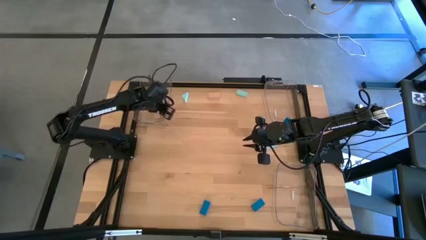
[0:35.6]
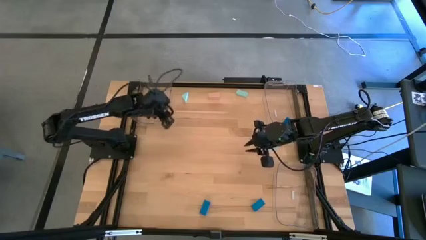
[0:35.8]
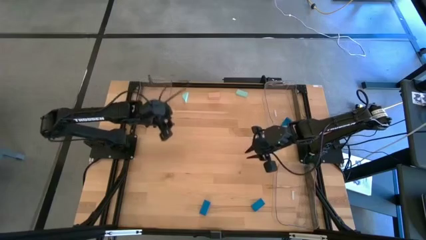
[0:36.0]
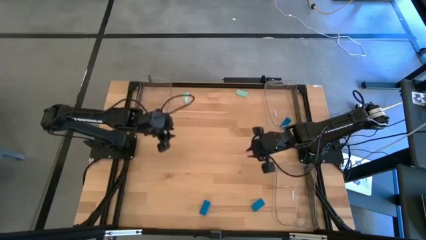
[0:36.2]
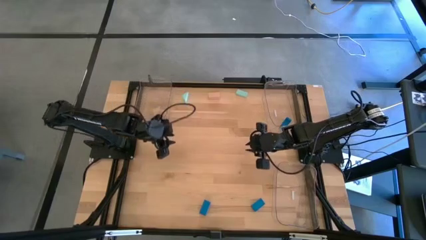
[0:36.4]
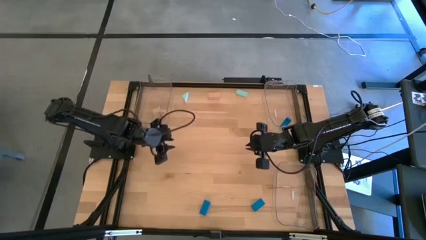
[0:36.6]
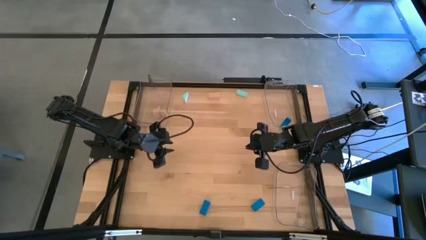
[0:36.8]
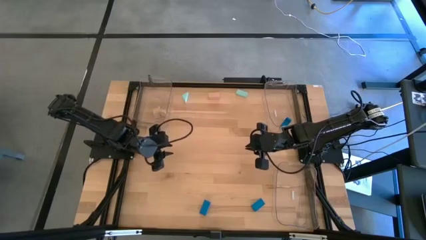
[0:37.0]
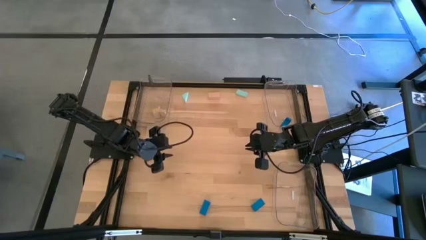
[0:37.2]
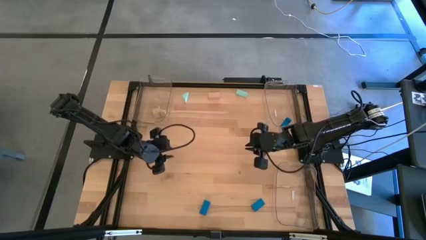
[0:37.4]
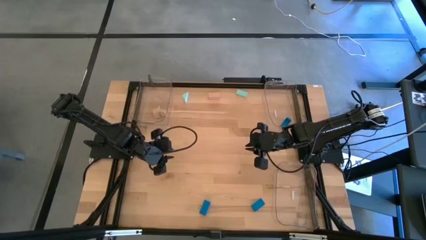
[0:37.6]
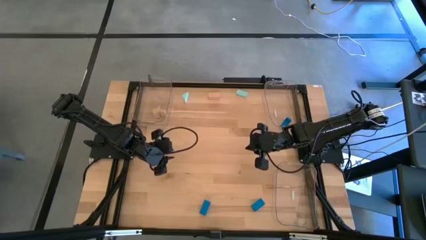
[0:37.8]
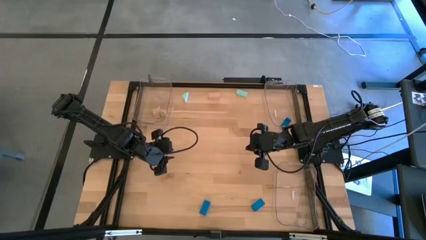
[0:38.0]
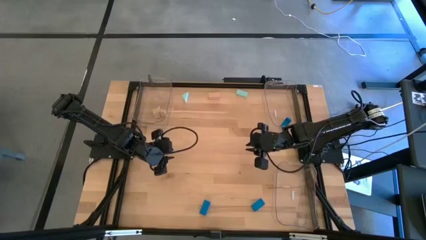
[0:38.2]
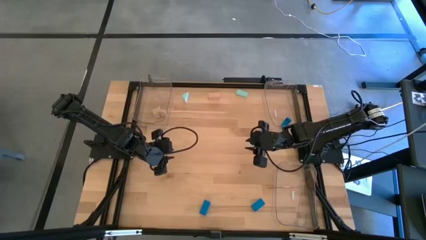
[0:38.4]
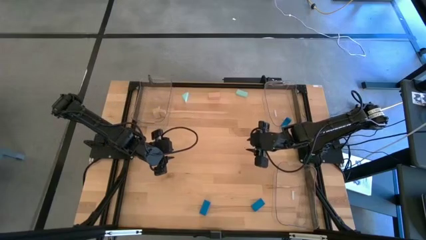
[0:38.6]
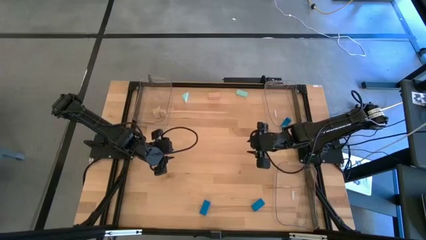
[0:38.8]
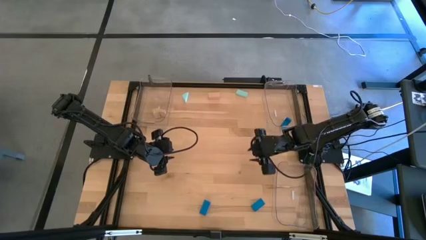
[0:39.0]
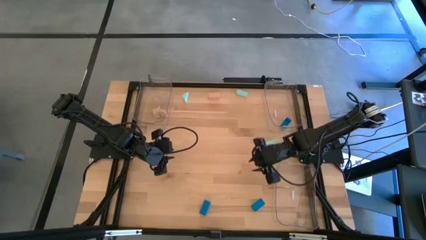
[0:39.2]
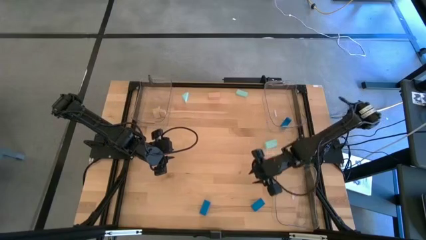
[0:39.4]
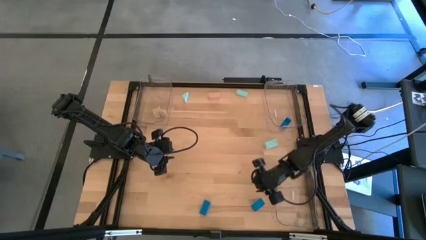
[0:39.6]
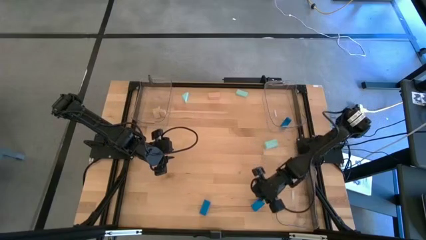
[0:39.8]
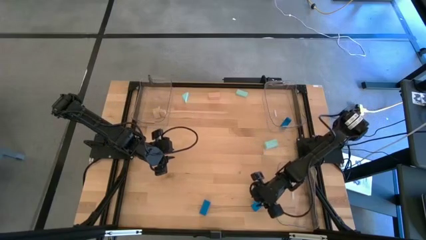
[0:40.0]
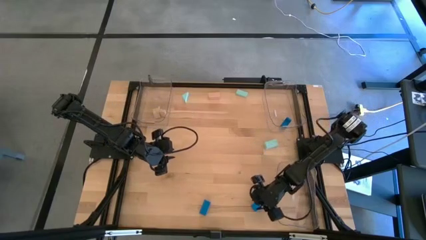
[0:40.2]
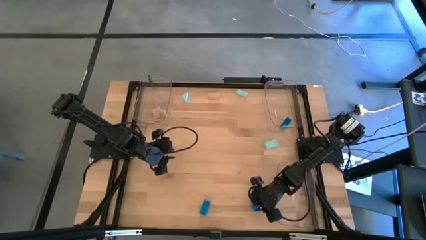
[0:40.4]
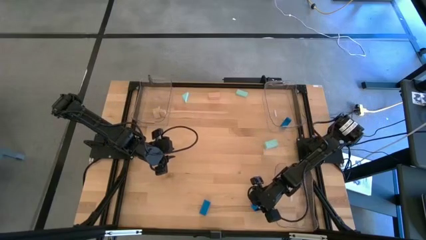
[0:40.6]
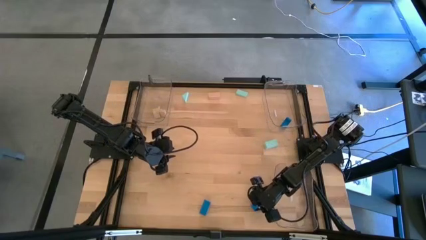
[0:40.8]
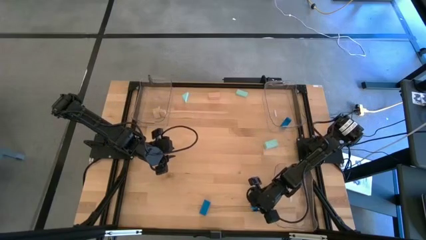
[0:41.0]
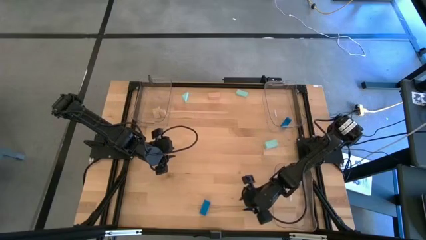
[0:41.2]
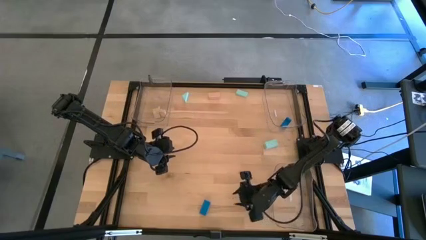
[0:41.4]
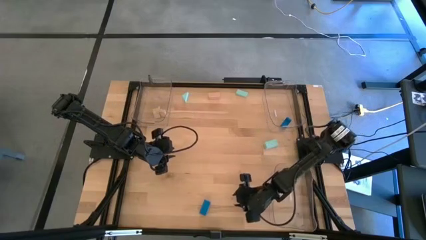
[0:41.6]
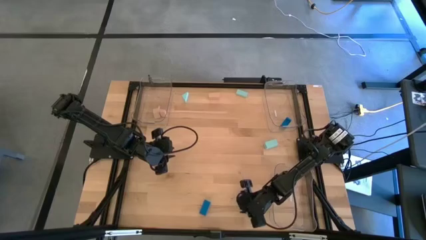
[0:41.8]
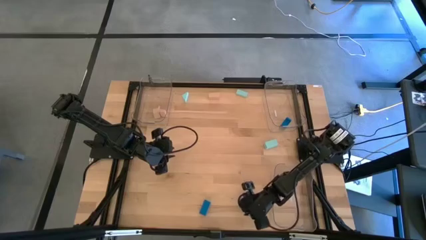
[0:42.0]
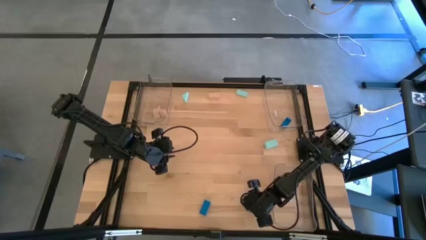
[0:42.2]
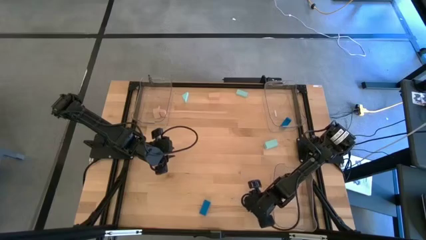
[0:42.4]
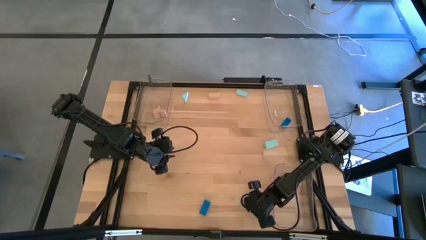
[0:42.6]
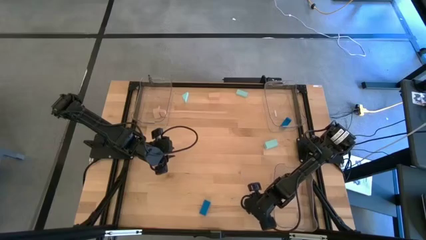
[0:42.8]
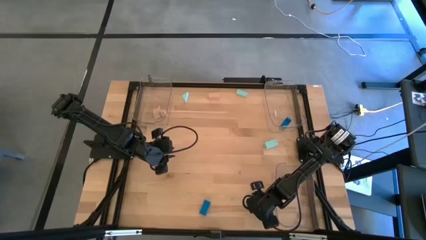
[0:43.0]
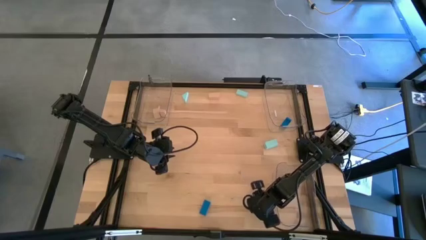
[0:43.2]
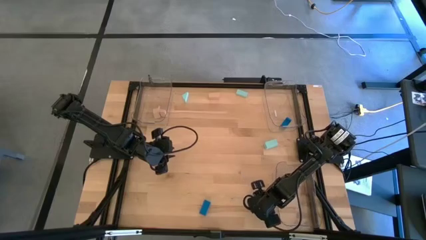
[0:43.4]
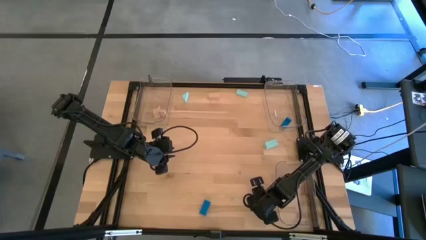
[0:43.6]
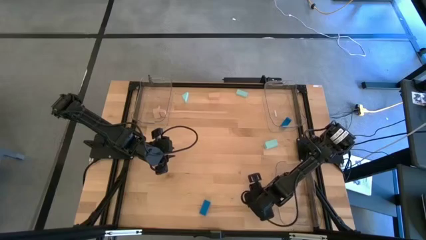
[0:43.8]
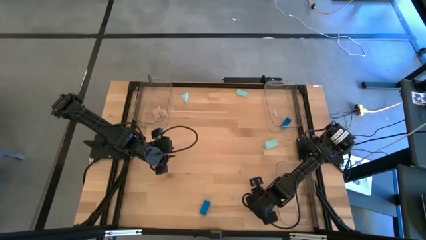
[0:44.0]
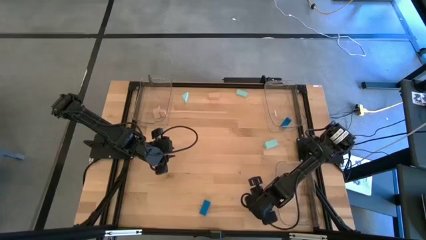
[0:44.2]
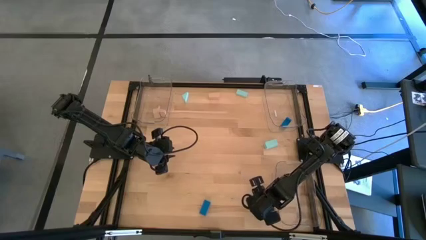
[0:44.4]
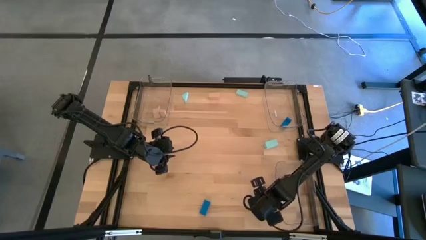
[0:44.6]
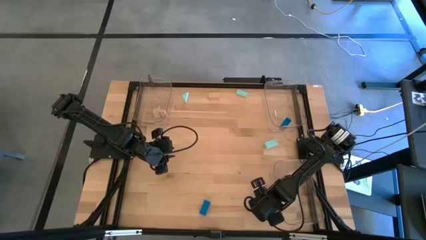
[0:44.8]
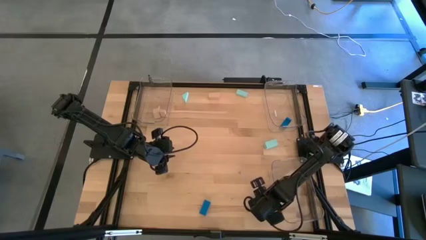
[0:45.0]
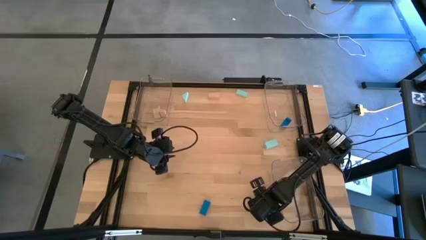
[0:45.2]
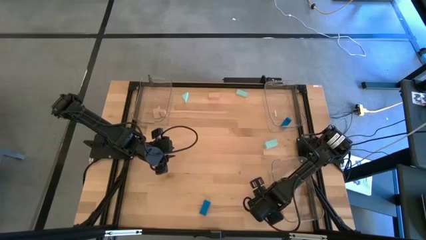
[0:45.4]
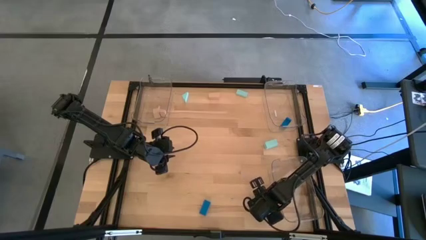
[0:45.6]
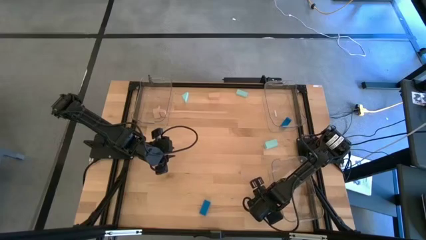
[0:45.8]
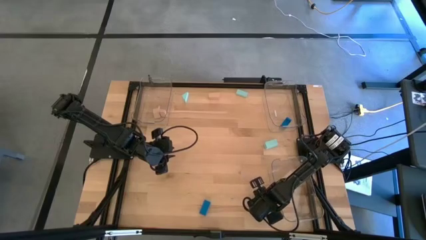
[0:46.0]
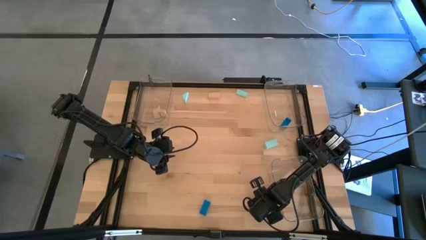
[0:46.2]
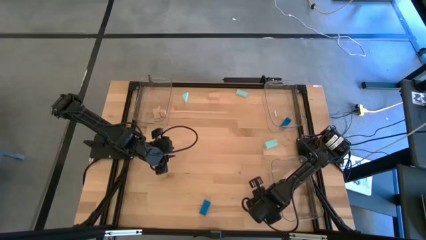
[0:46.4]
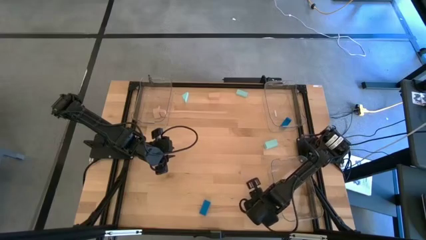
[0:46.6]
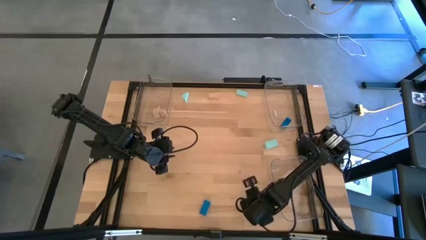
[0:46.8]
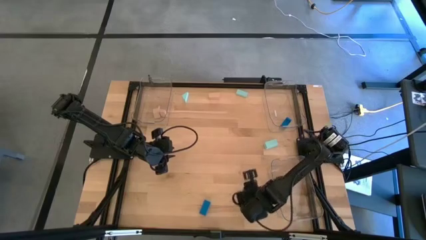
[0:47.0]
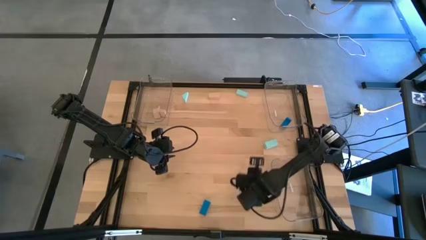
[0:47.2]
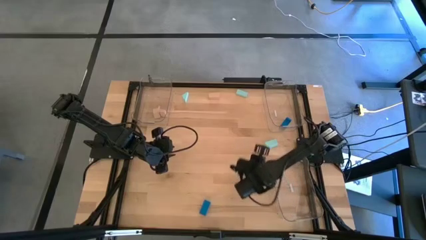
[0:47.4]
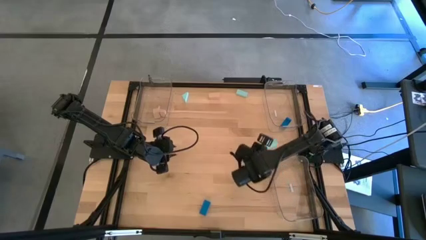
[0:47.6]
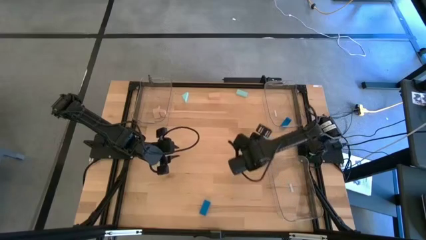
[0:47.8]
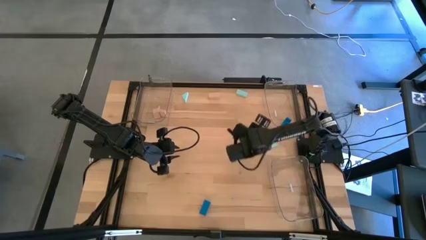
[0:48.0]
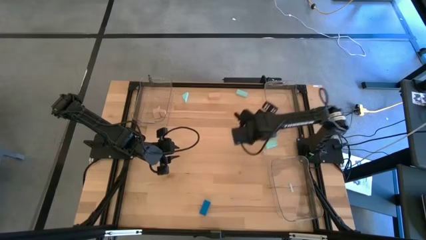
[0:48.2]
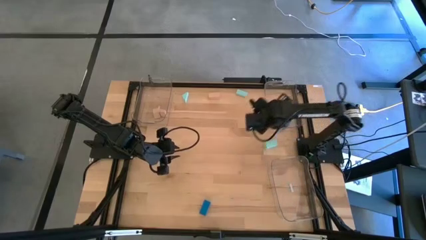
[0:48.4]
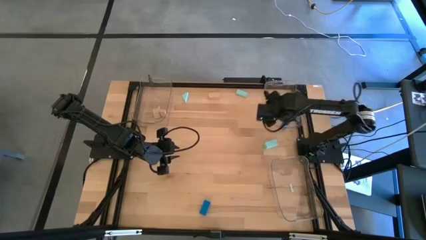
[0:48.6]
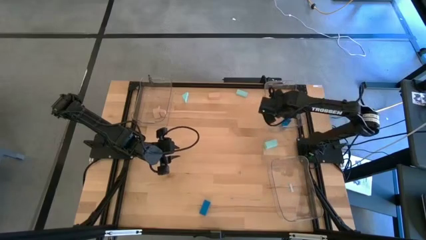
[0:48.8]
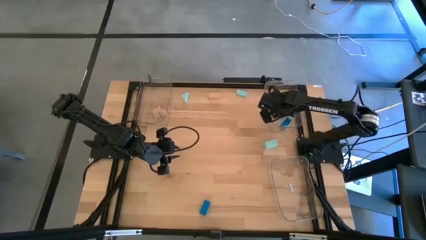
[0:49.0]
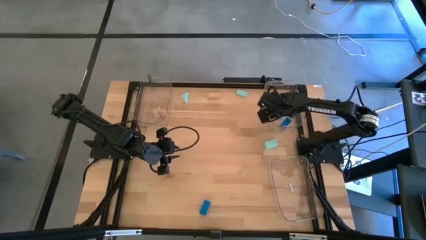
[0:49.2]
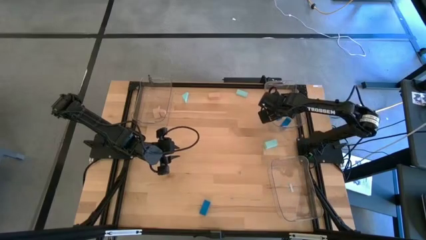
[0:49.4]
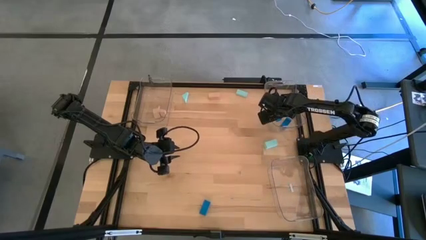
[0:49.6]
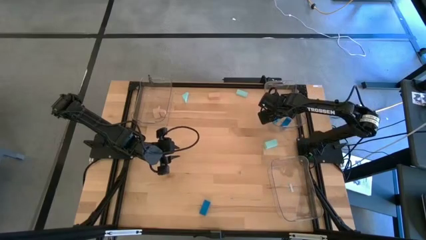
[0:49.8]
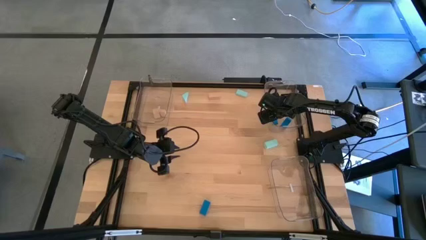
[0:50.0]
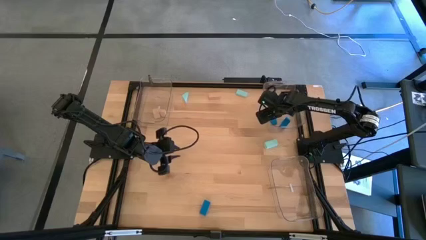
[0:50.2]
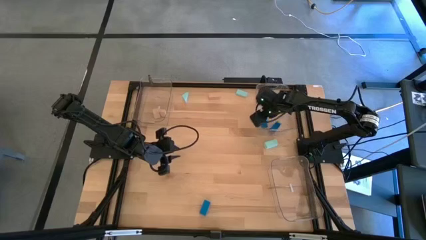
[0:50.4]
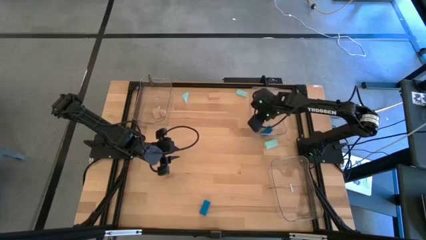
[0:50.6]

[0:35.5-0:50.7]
Task: Sort & place blocks by color
Put the bottom right blue block into the top right transparent bin

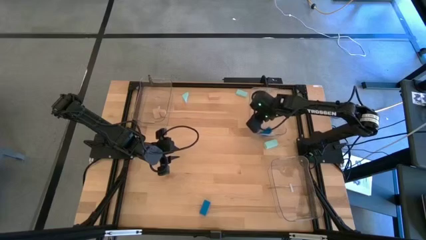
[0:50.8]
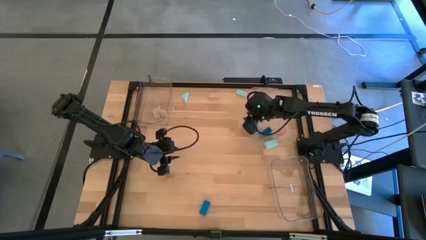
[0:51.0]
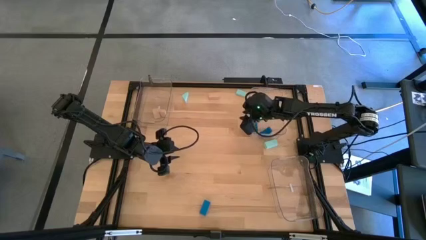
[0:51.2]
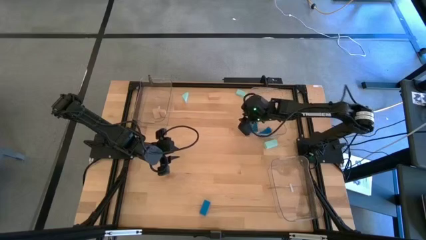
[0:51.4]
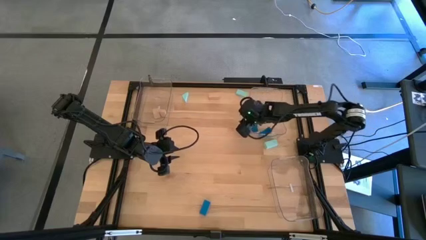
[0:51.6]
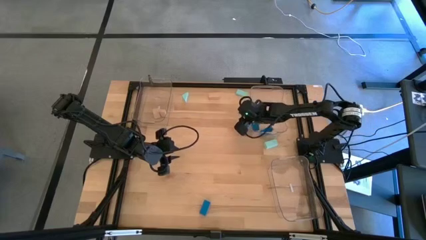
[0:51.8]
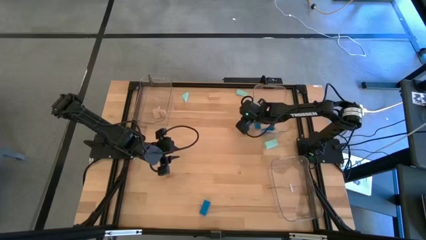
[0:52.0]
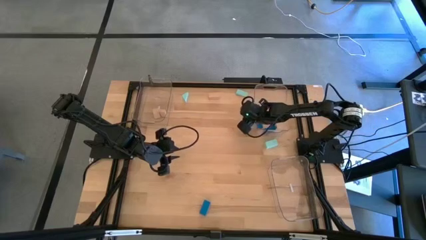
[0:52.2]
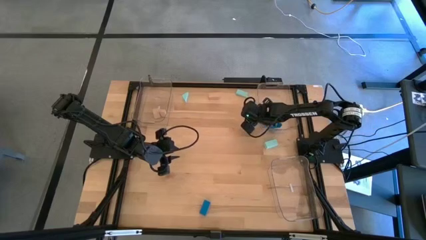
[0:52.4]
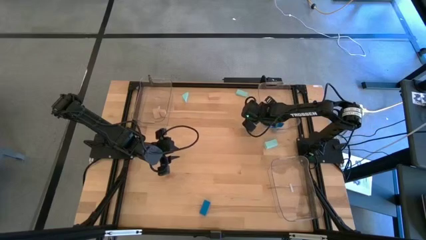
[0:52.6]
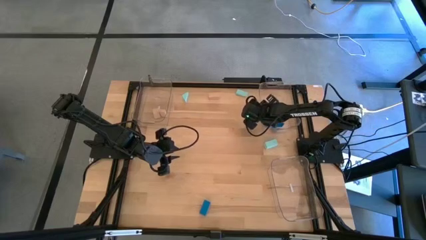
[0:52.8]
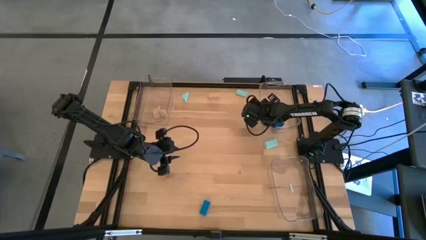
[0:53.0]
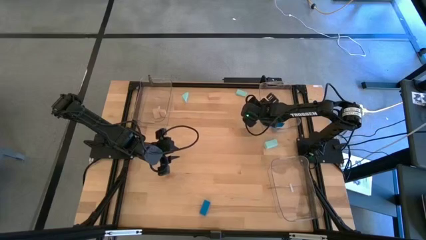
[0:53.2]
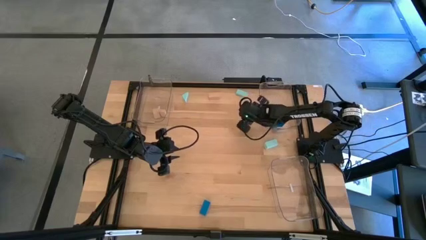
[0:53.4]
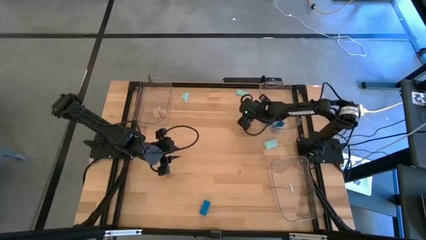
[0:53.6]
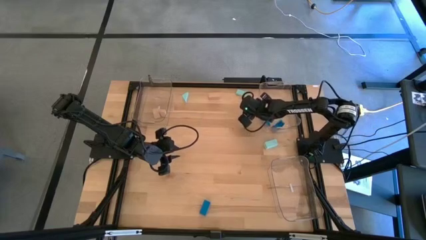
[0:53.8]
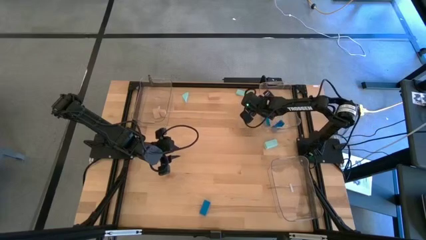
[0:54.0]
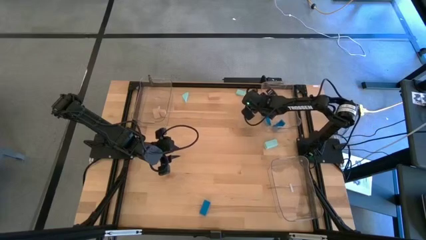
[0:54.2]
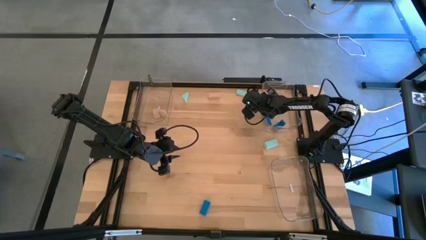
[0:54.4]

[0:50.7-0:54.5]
Adjust the top right transparent bin
